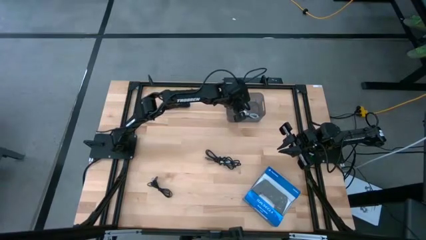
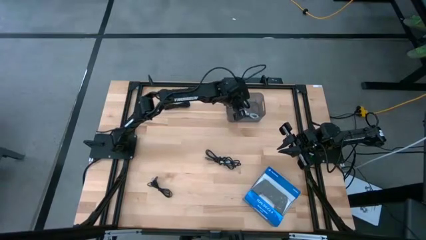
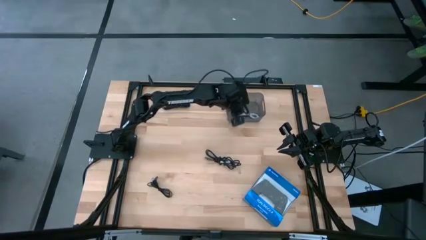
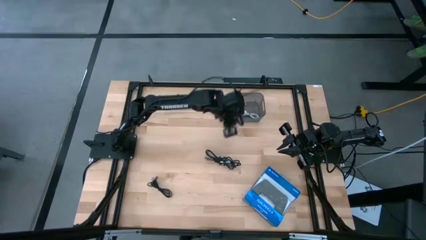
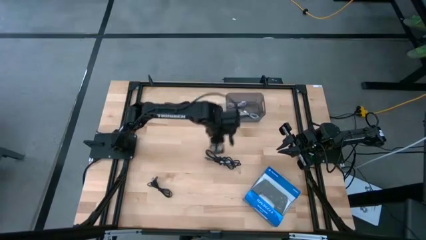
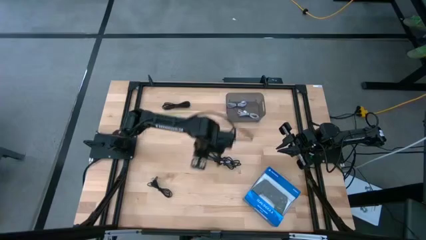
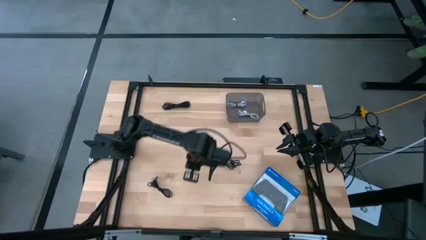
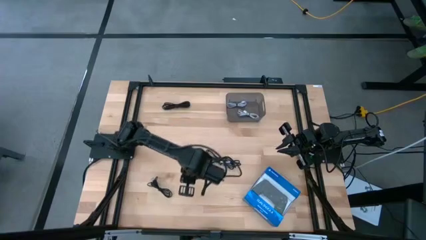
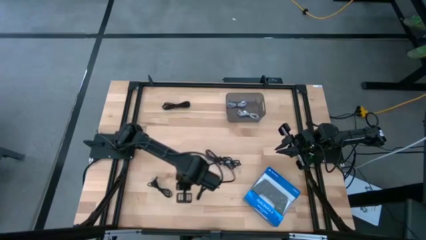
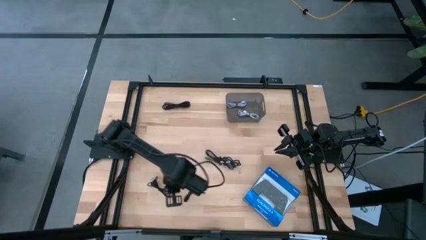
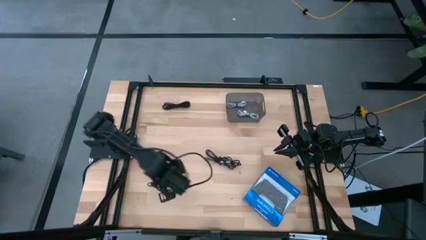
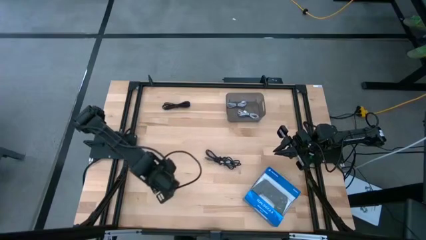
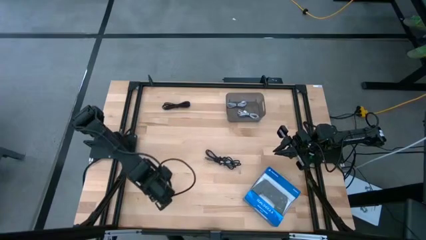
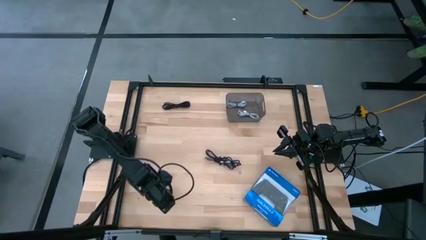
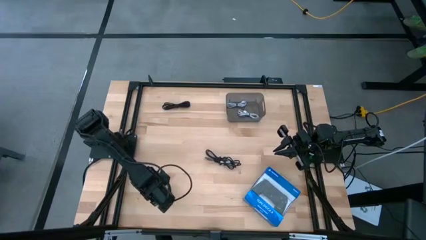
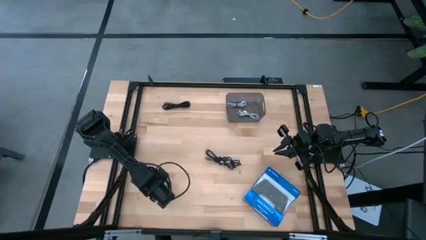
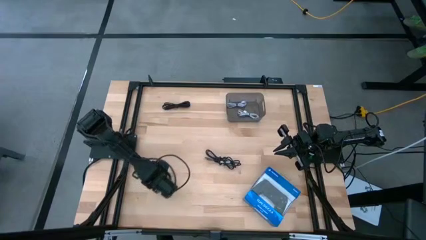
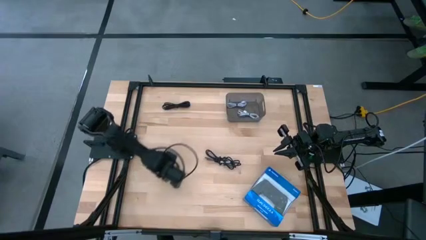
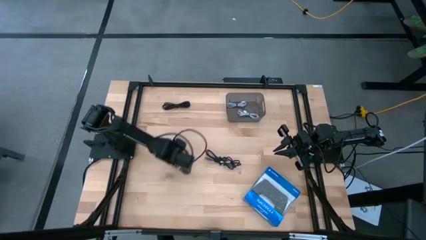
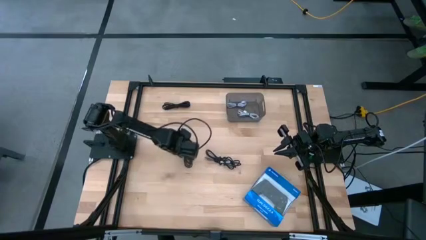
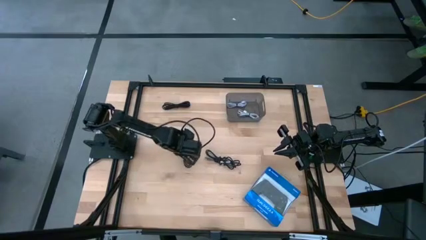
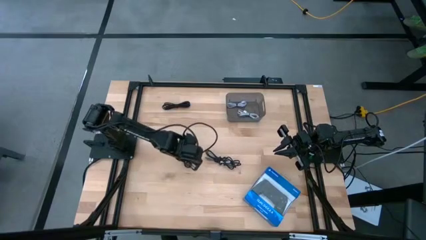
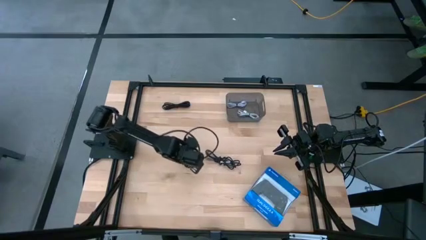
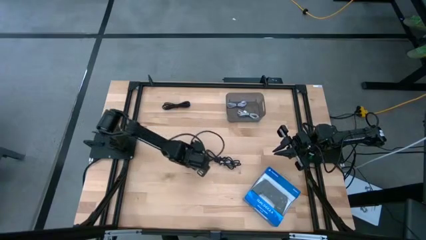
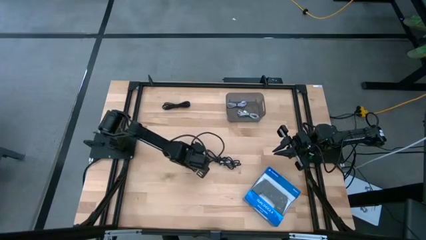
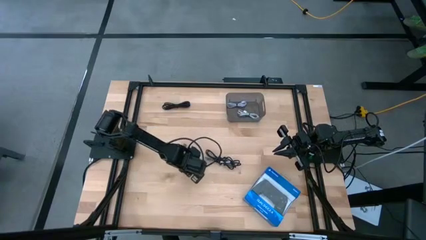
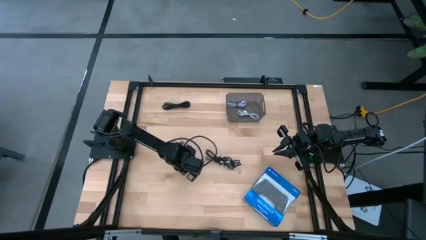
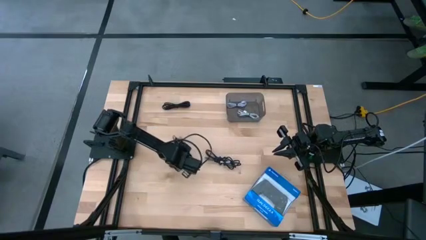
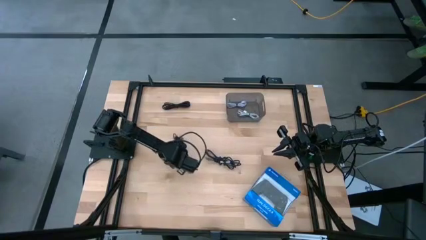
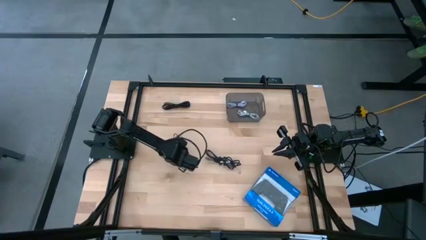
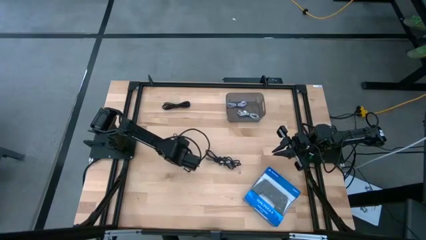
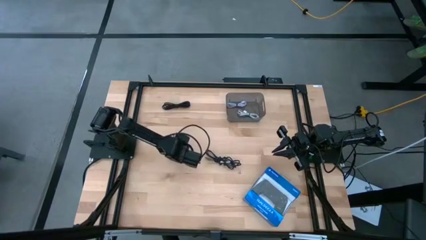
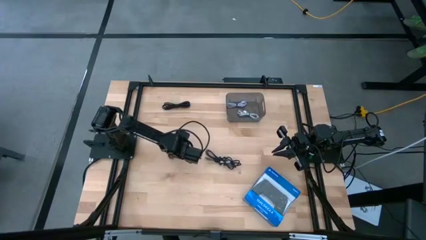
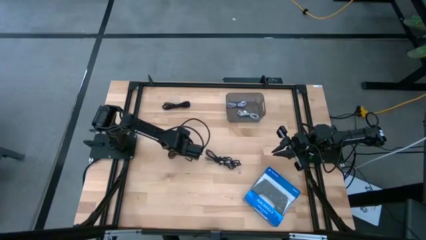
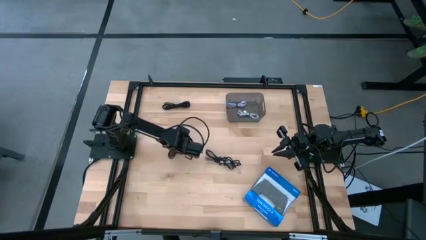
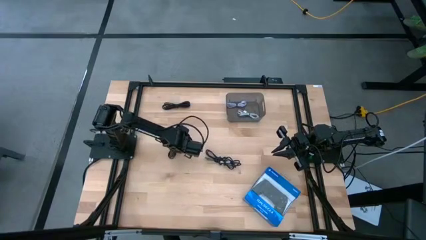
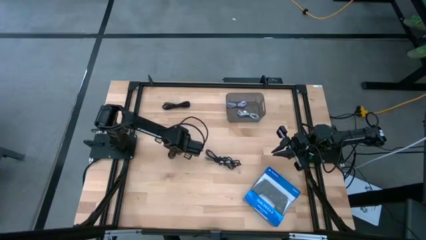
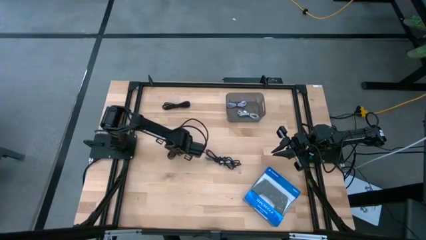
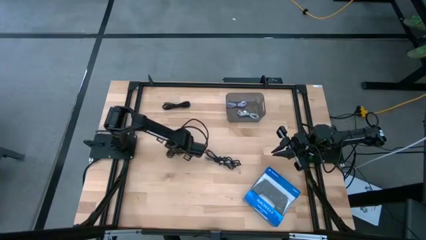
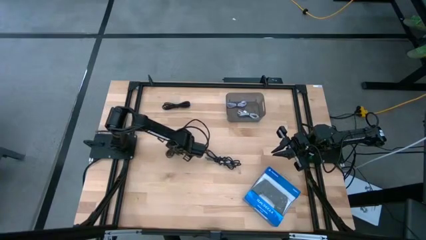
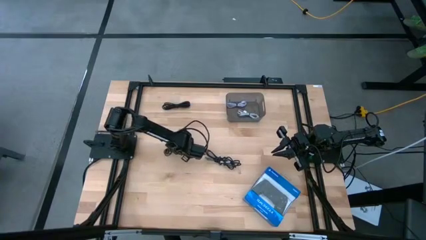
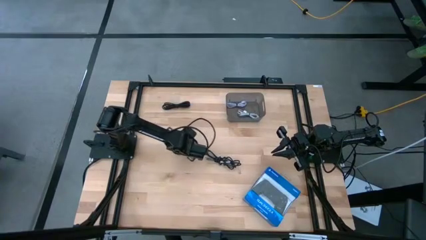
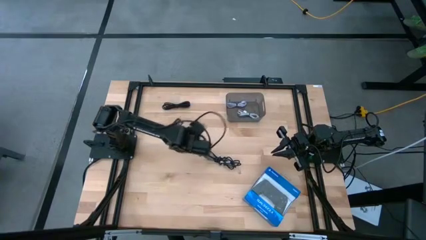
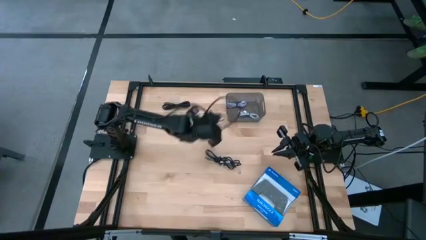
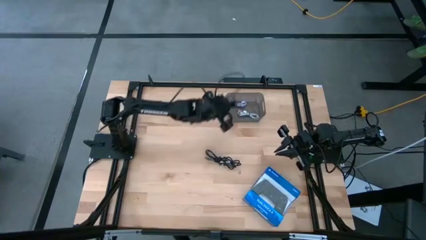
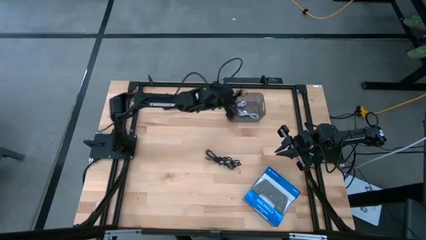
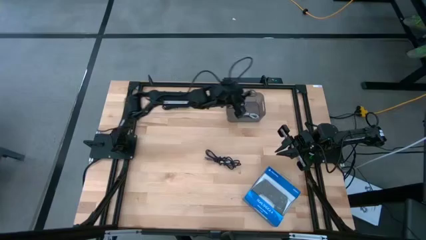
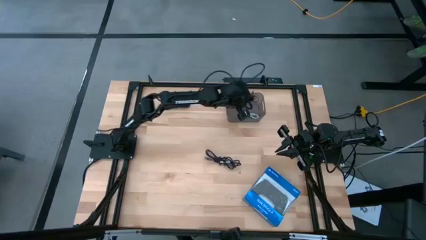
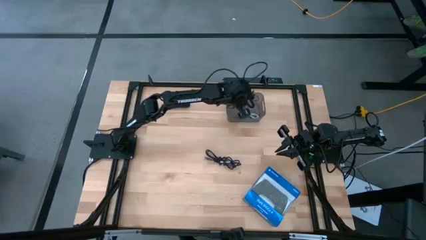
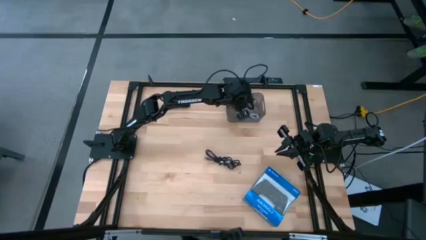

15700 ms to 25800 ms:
Task: Pick and place USB-C Cables
Put the bottom black charger cable into the black bin

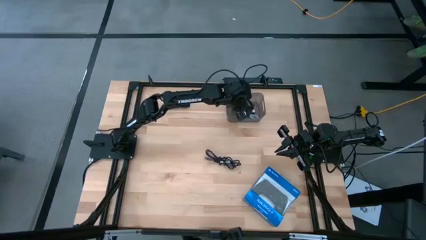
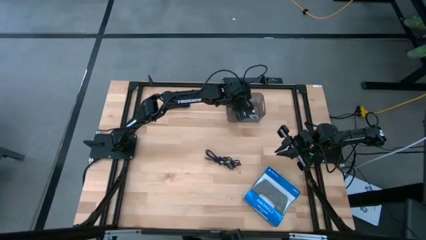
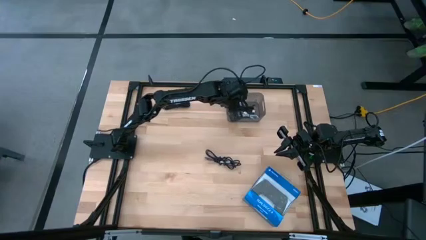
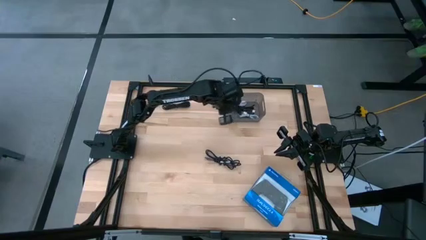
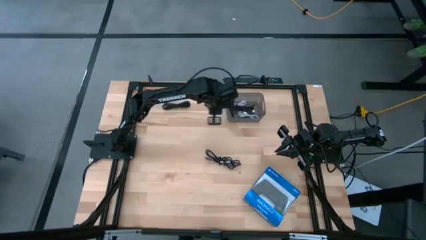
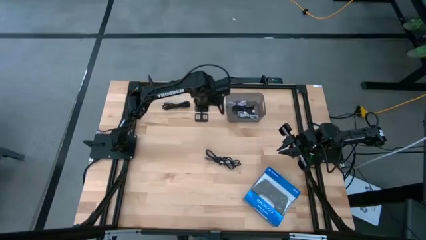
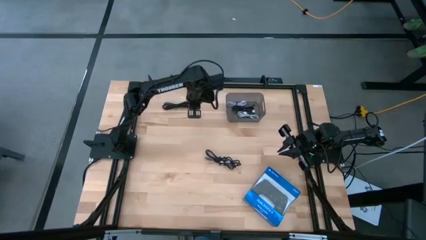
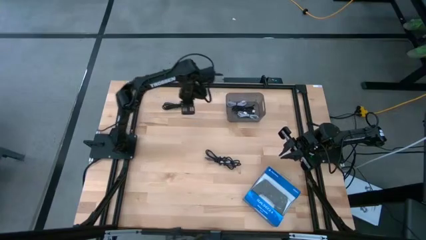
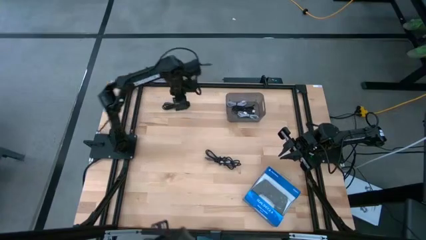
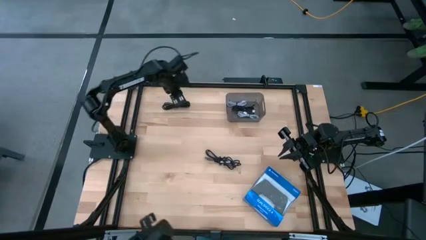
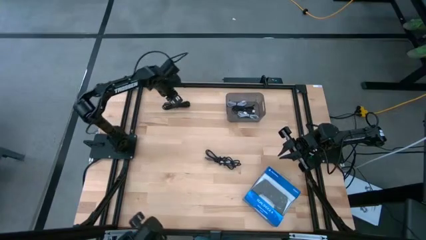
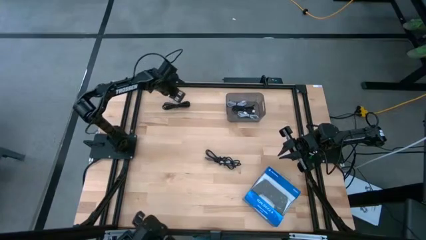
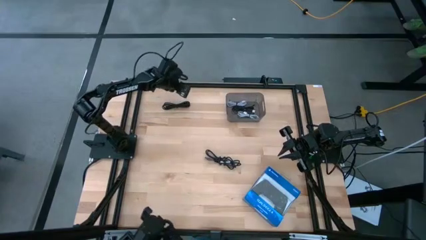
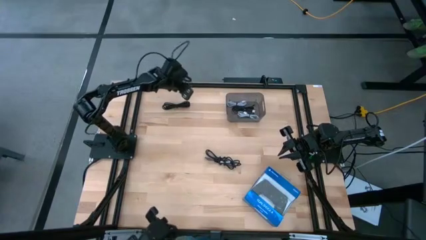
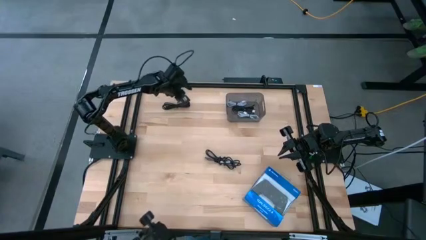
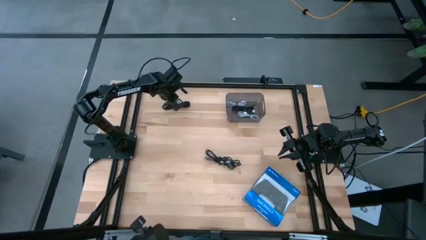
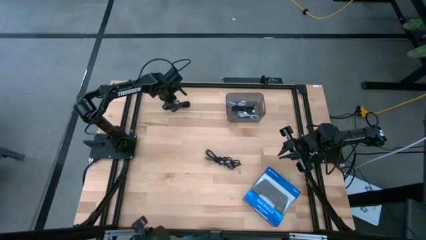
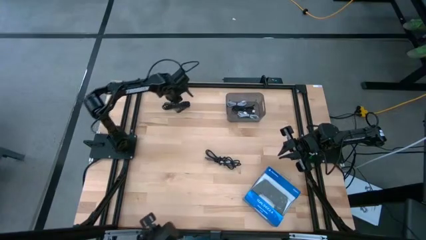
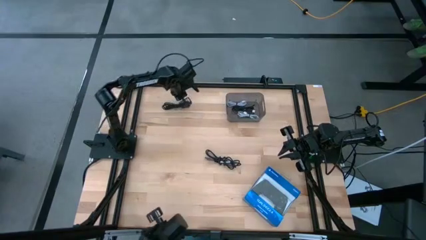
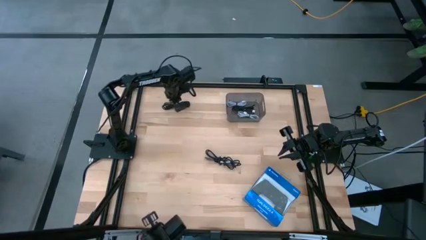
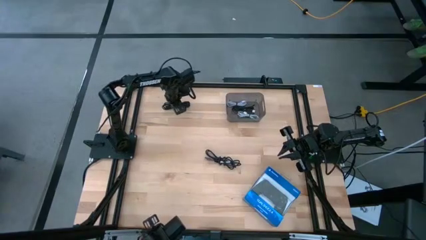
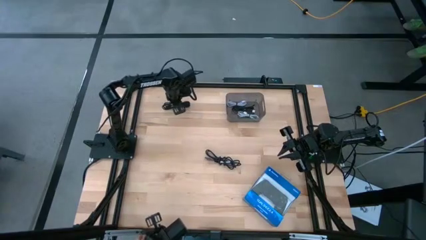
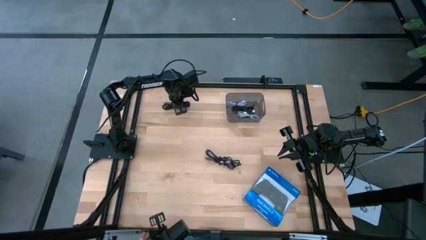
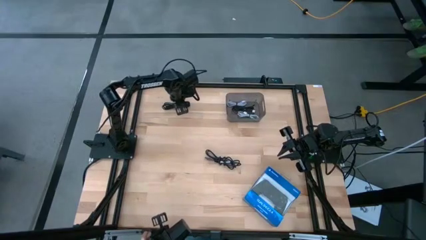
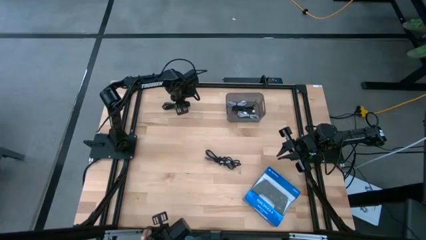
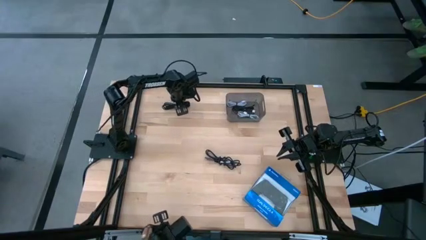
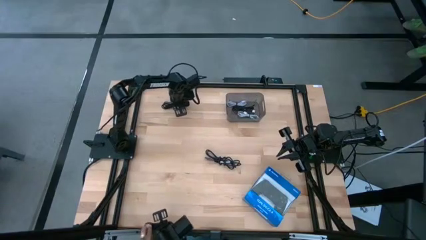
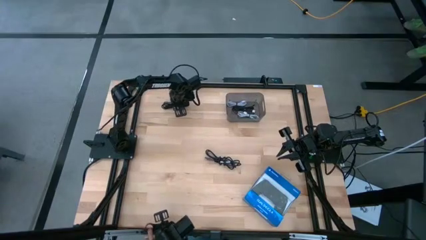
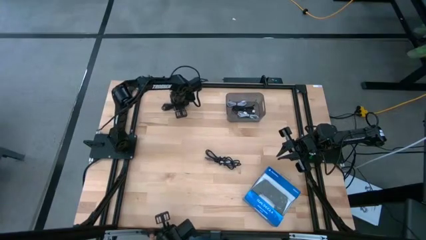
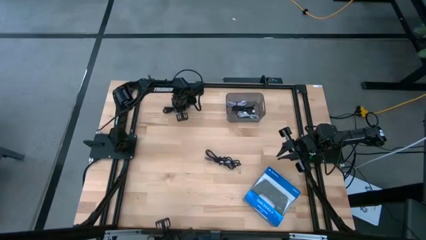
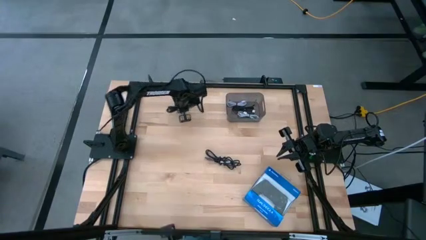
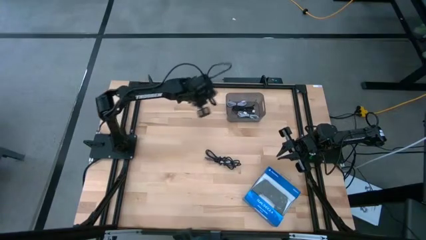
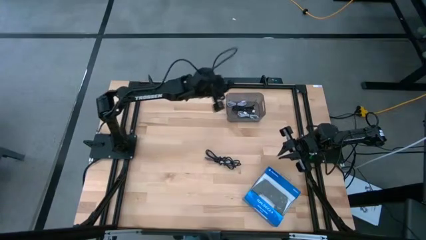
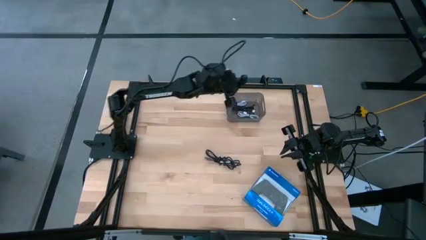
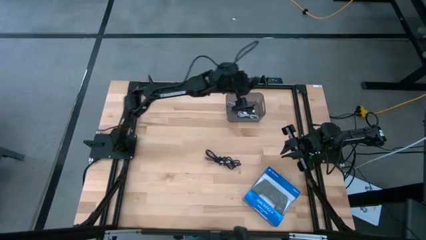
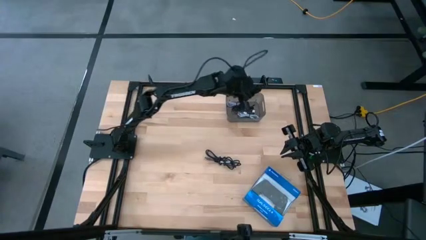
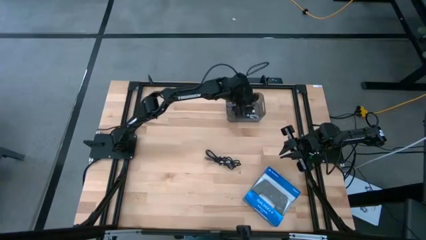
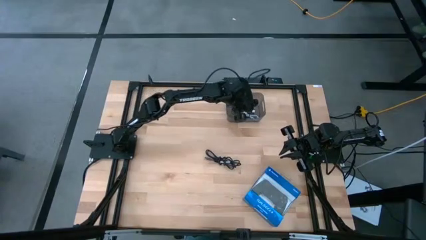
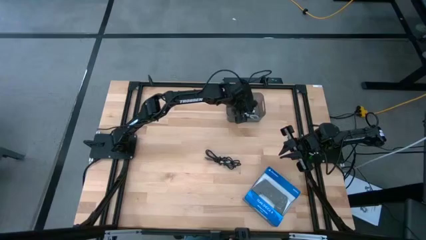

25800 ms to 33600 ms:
Put the top black charger cable into the black bin
